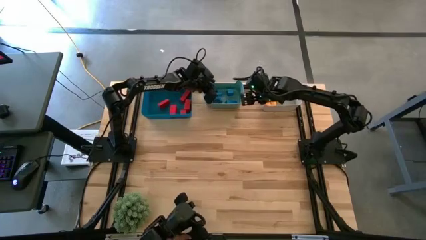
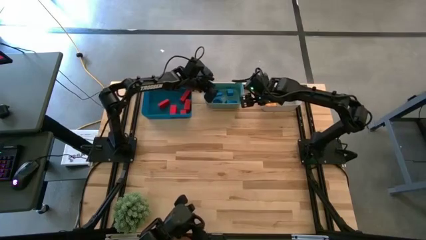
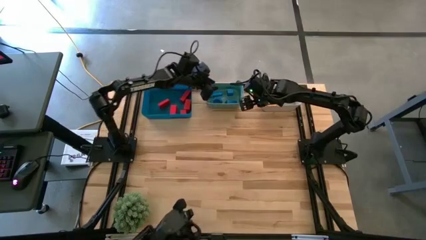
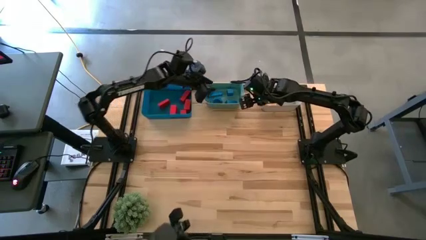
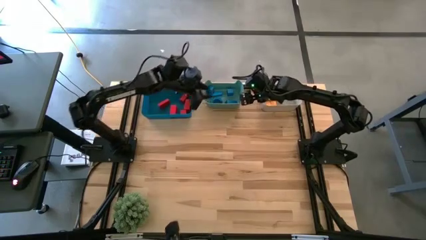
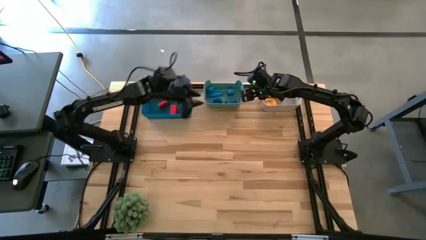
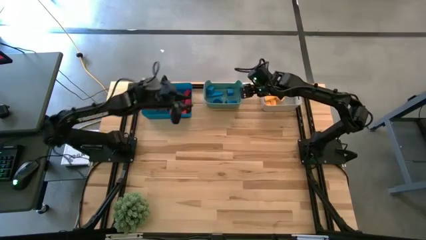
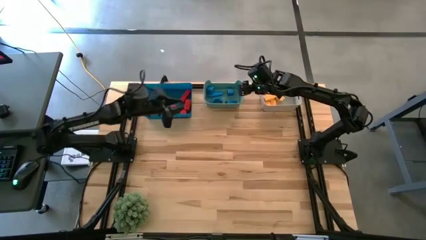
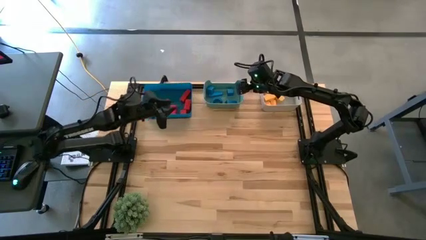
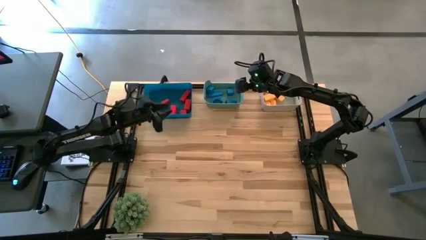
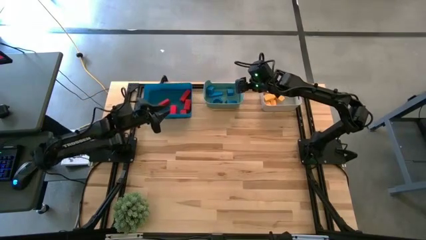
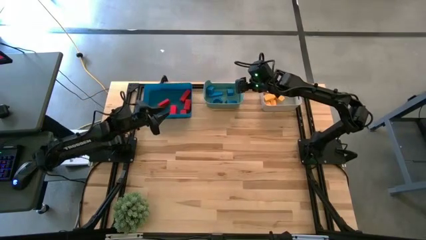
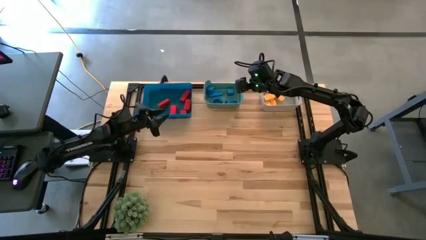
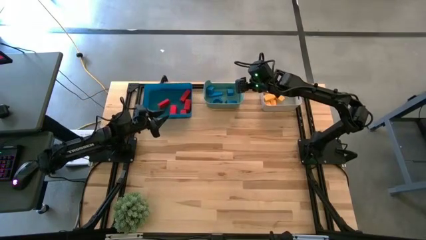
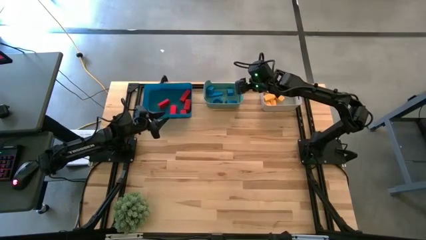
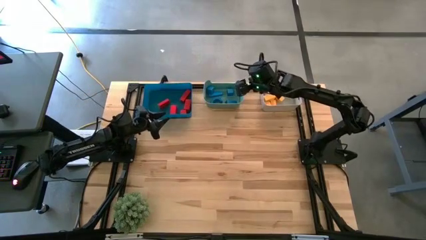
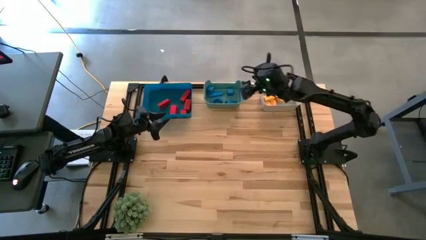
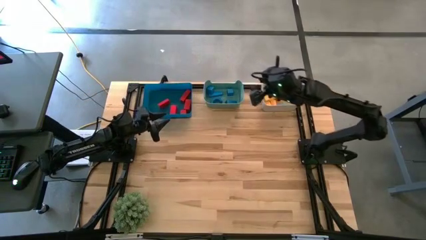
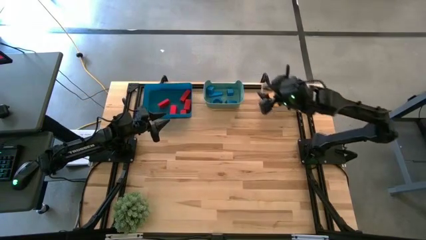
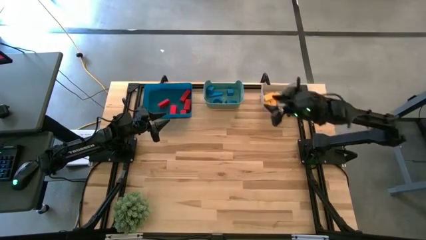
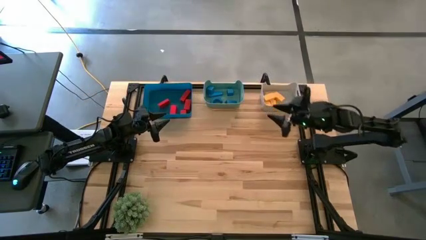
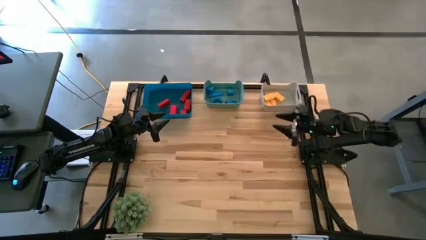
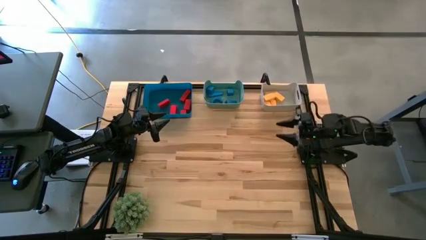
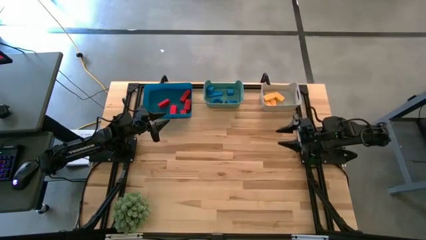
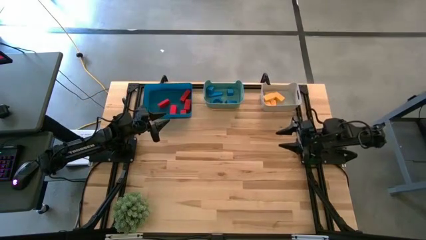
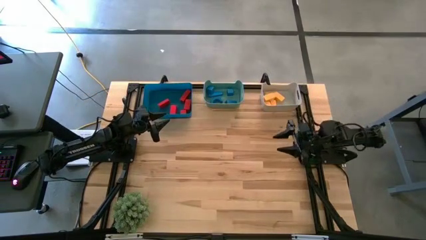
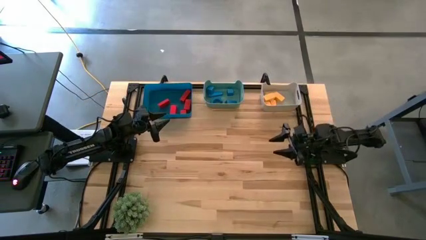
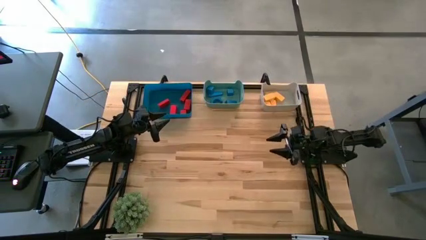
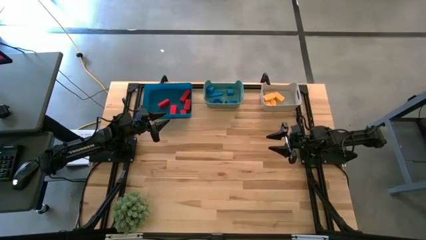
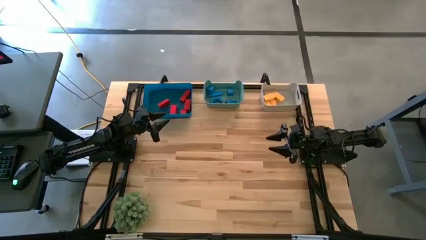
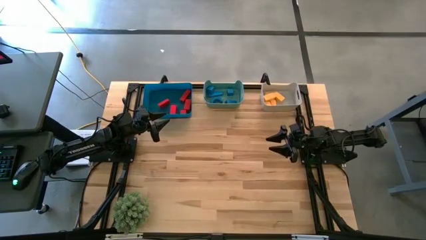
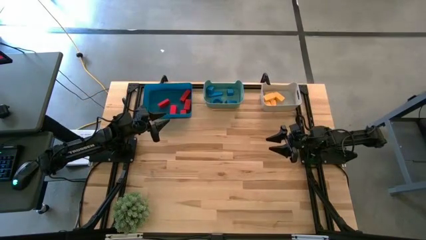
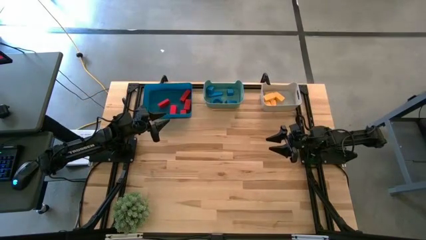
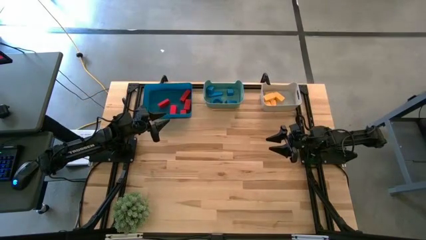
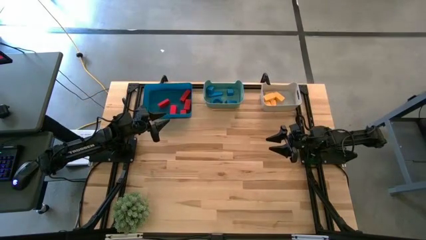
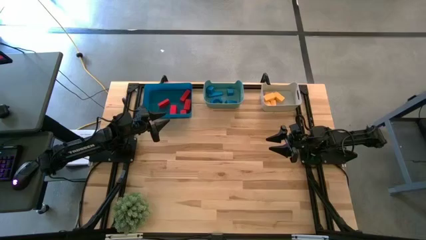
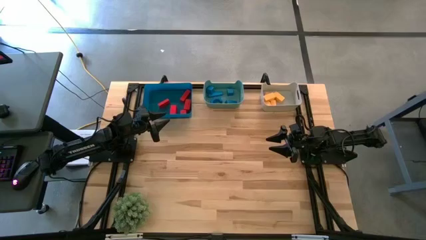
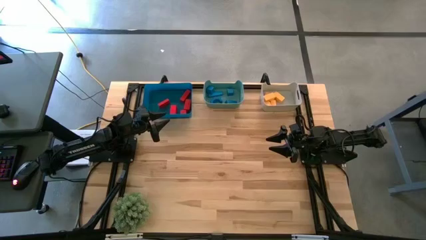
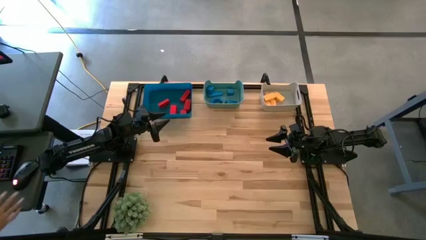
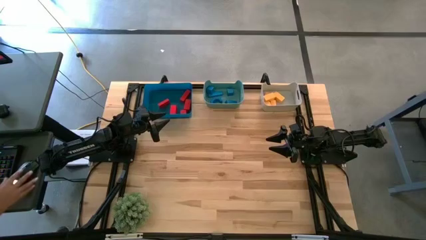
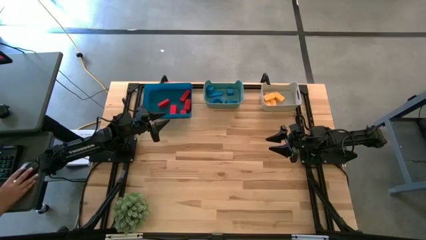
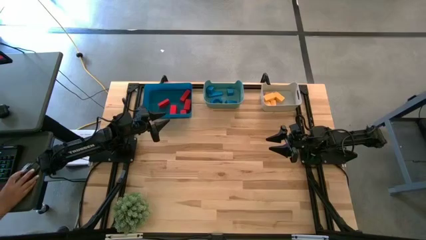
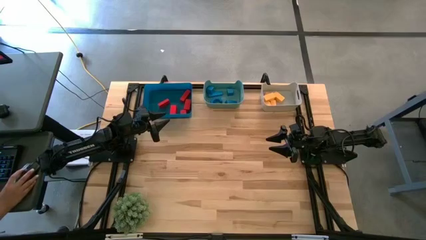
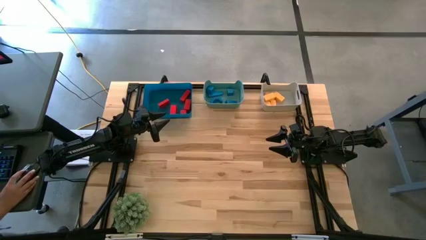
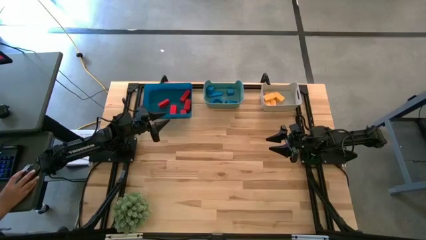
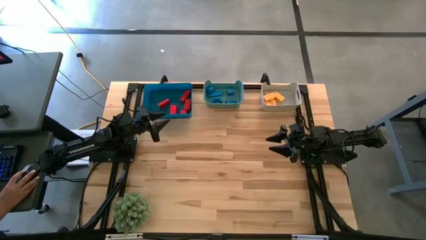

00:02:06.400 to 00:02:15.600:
Task: Sort & place blocks by color
Return to Home Position

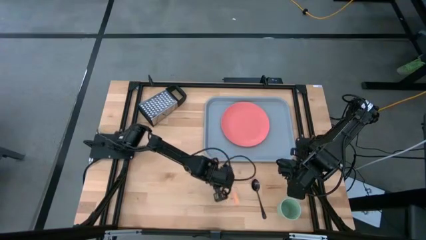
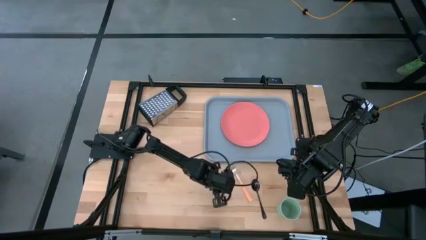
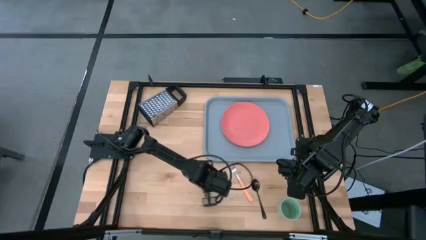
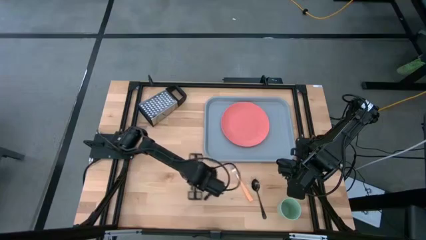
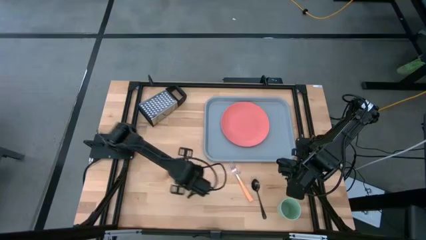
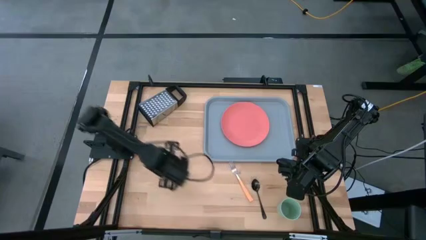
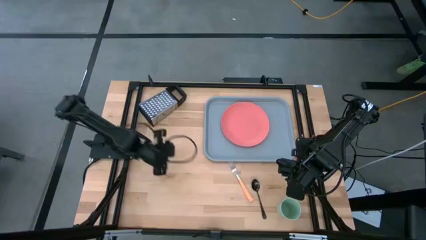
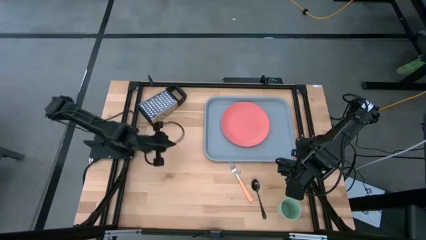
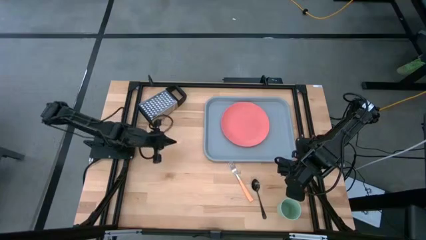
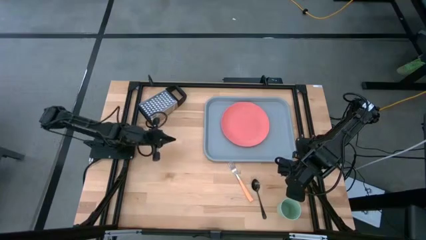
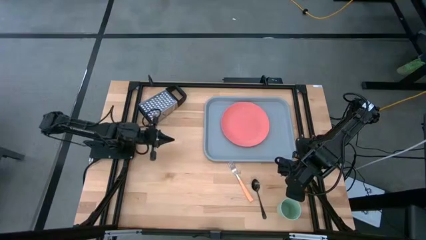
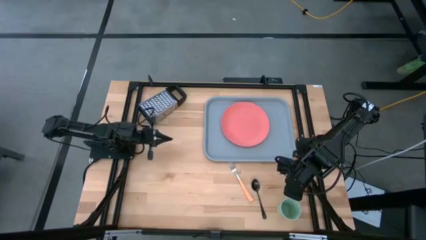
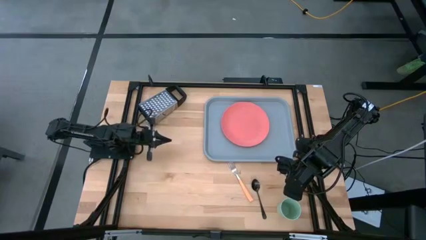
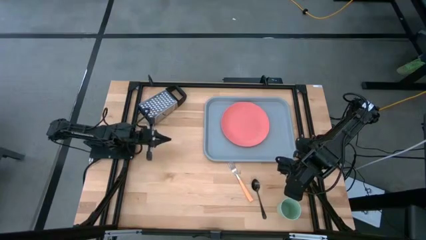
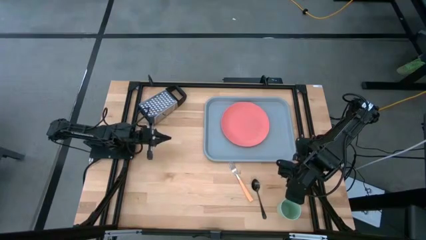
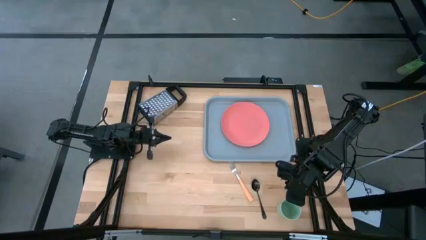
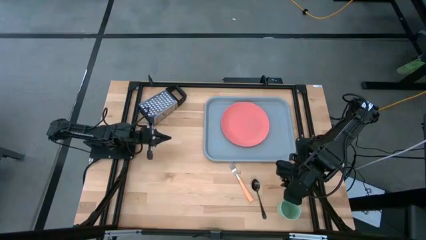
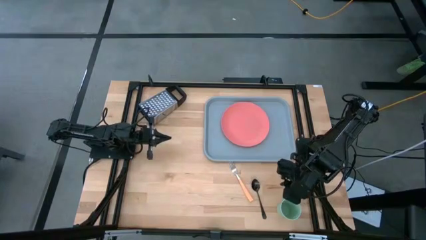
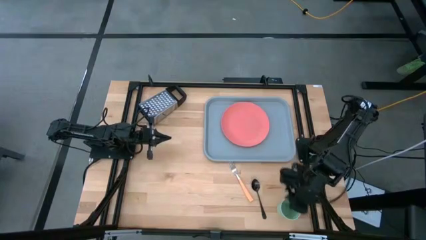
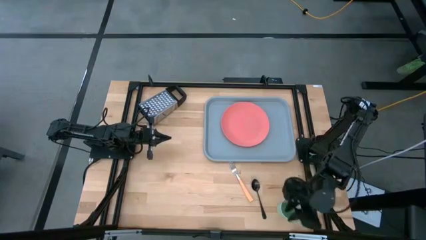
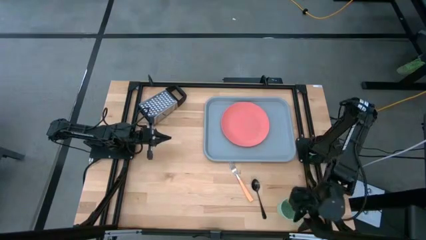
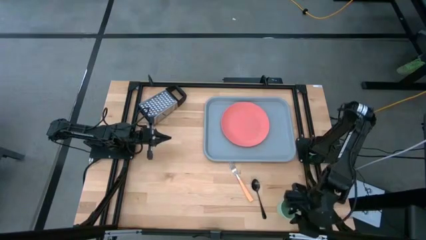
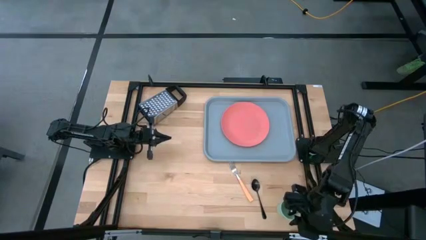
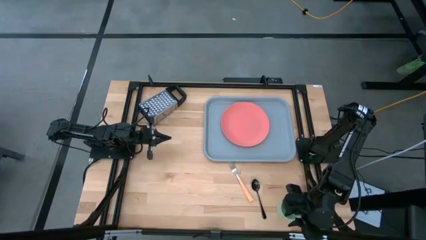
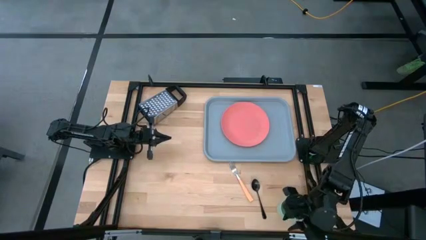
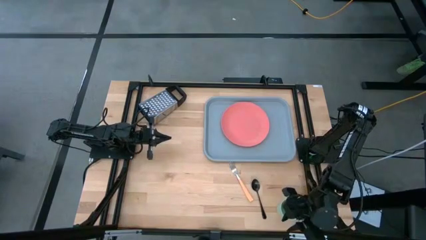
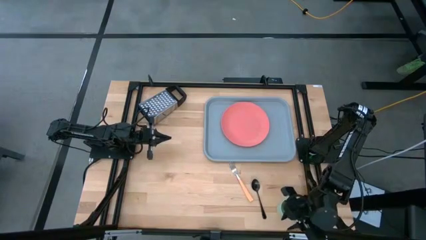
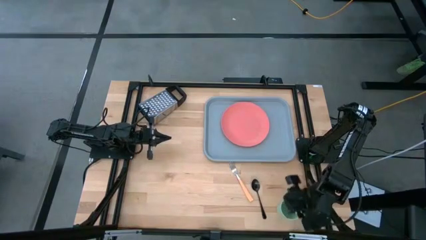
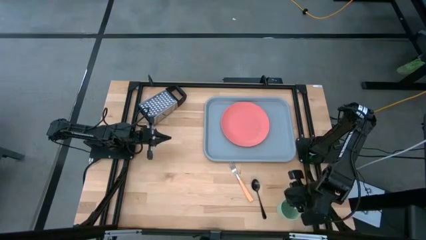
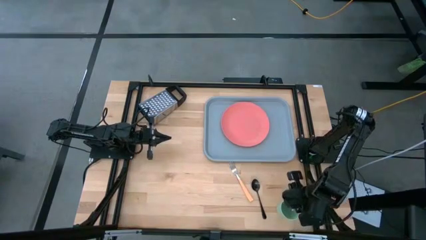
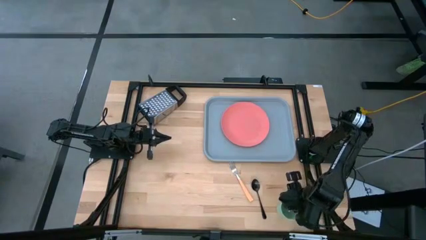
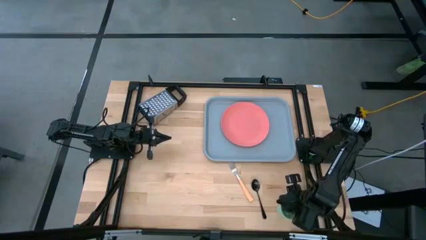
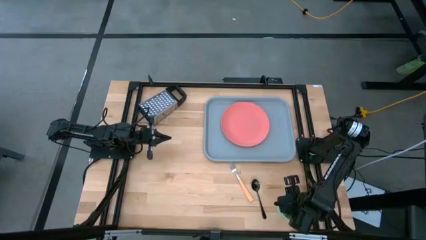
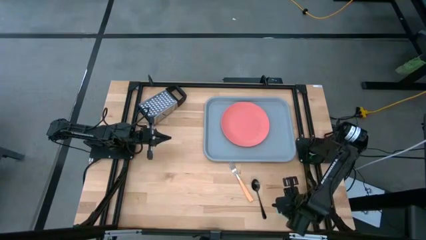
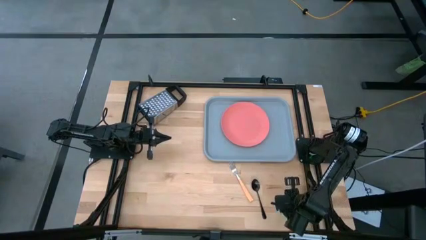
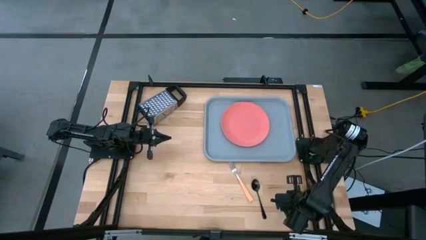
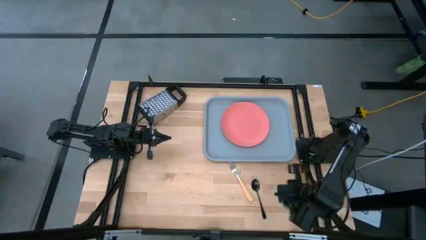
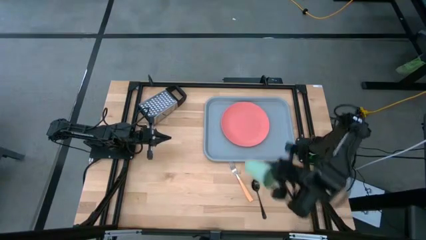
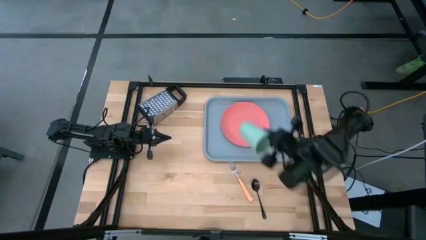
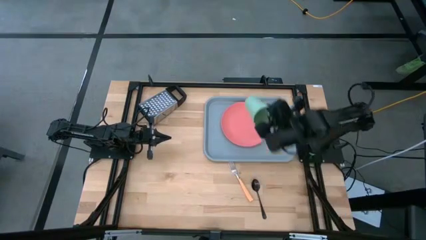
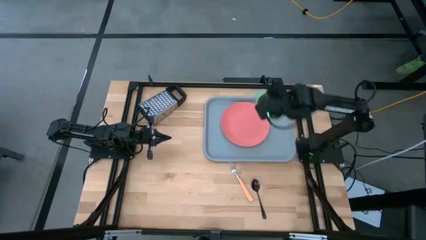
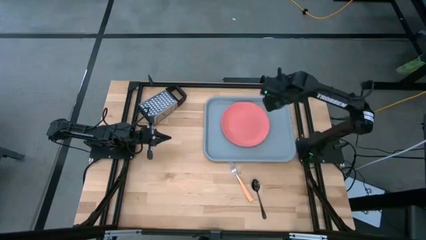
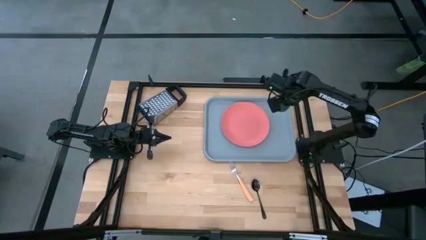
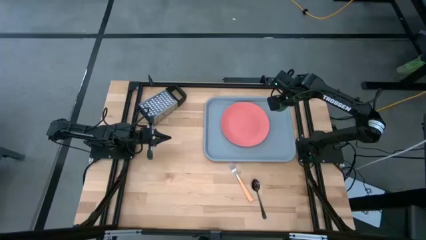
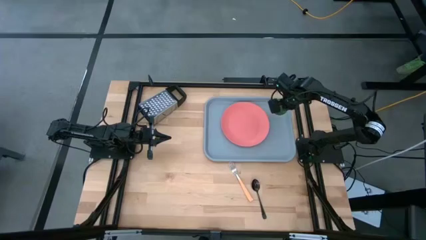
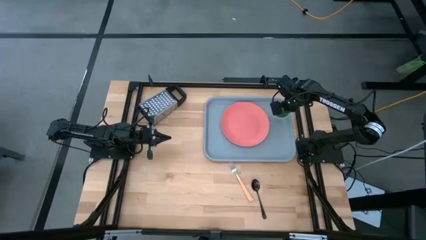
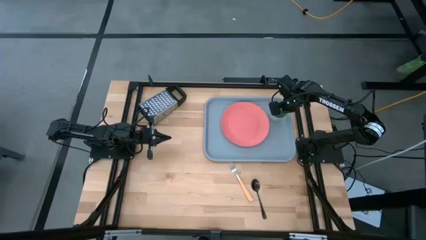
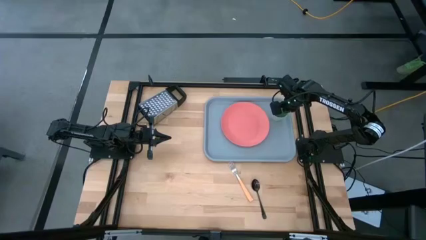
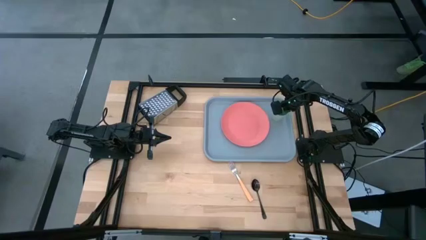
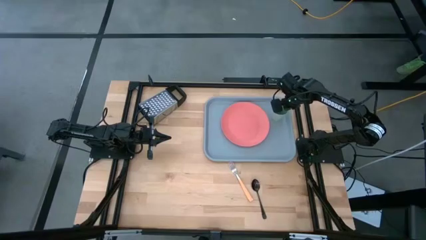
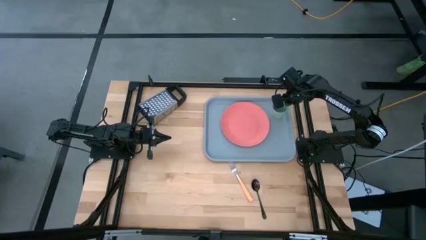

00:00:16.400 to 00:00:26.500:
Task: Pick and place plate/cup/fork/spoon on tray
Put the green cup on the gray serving tray
